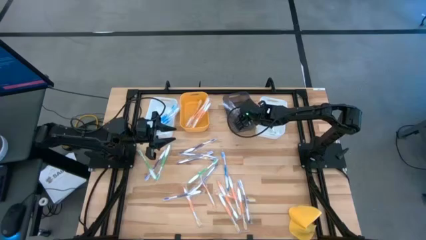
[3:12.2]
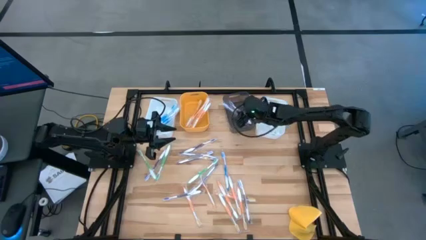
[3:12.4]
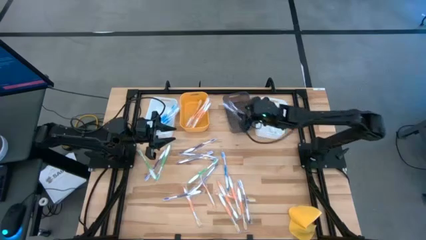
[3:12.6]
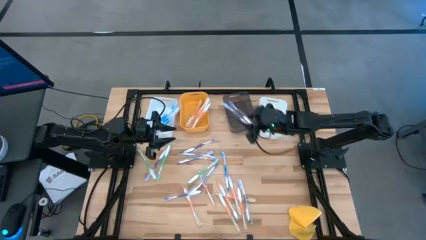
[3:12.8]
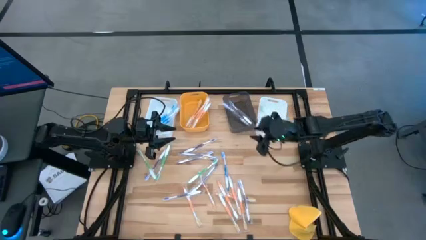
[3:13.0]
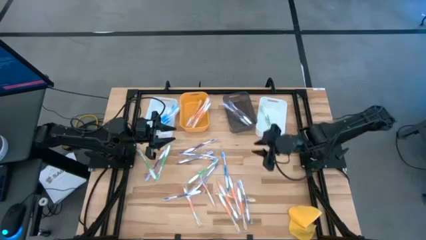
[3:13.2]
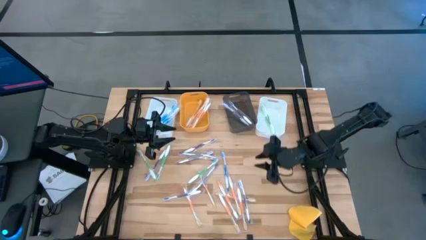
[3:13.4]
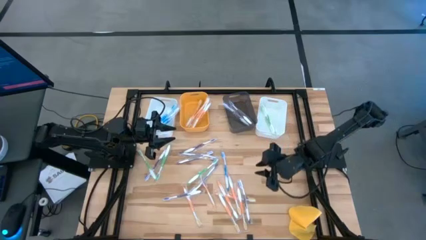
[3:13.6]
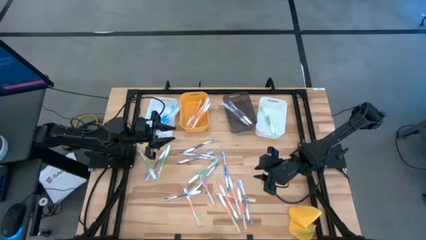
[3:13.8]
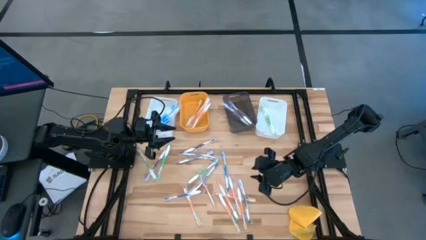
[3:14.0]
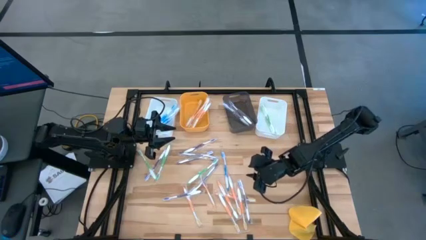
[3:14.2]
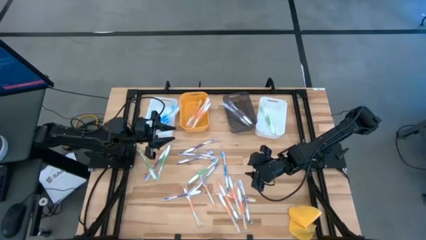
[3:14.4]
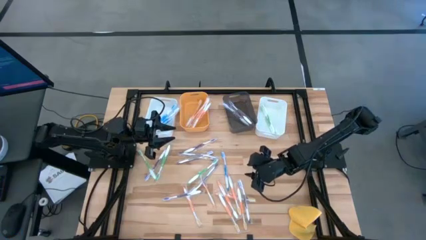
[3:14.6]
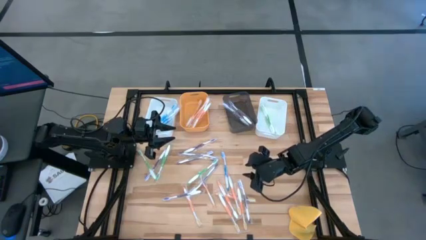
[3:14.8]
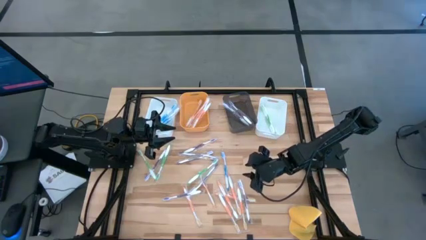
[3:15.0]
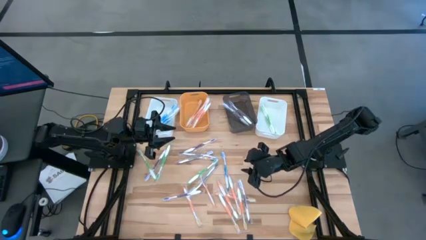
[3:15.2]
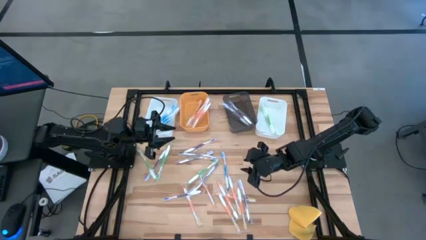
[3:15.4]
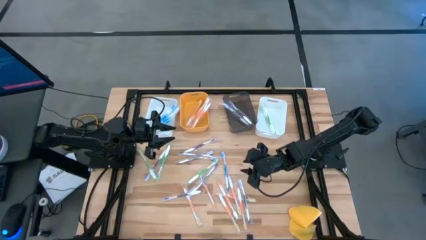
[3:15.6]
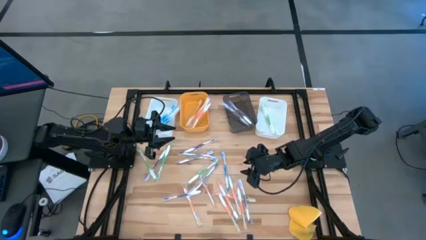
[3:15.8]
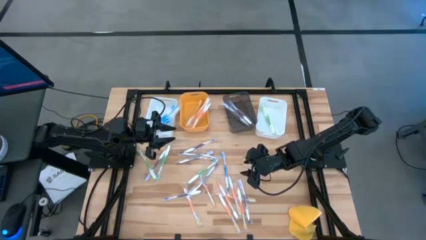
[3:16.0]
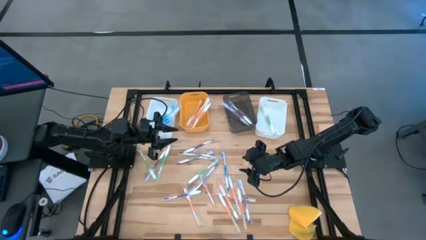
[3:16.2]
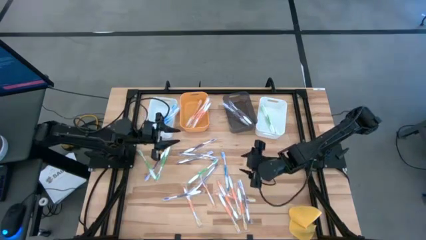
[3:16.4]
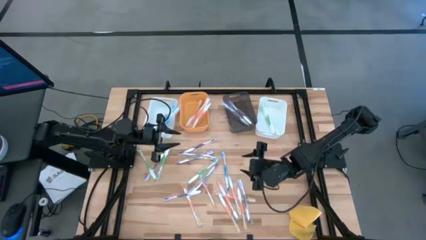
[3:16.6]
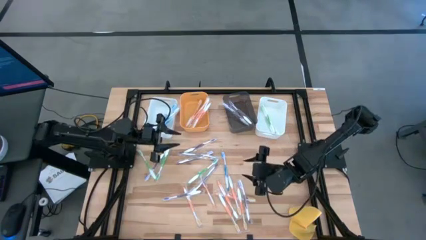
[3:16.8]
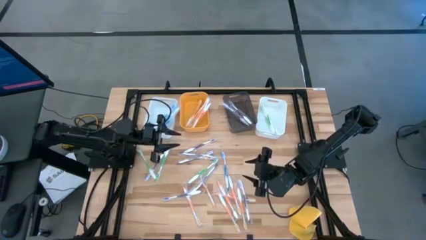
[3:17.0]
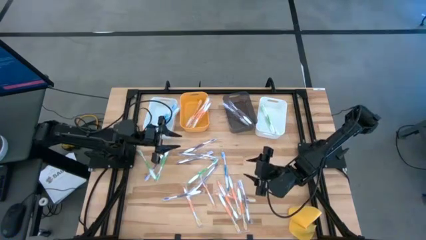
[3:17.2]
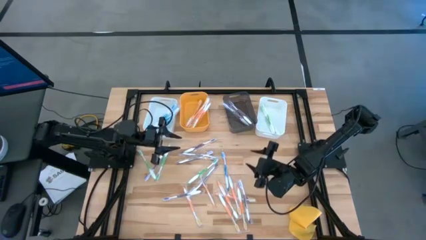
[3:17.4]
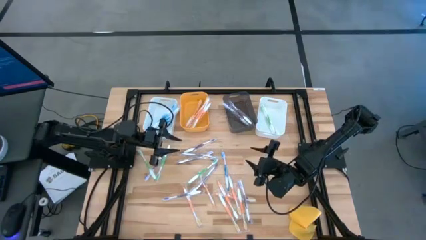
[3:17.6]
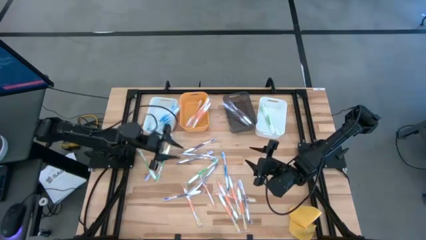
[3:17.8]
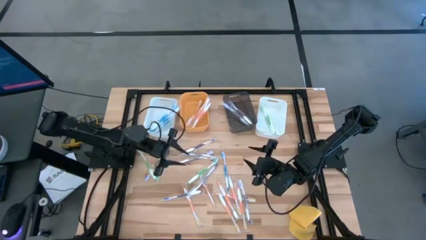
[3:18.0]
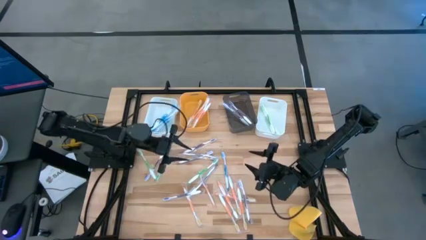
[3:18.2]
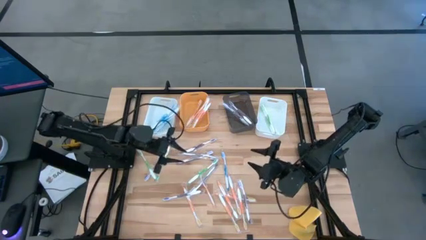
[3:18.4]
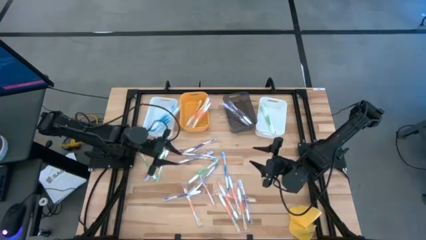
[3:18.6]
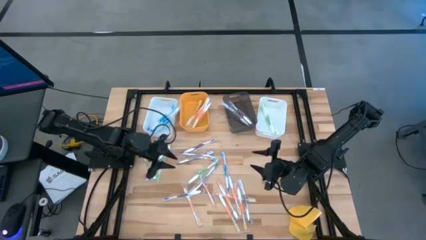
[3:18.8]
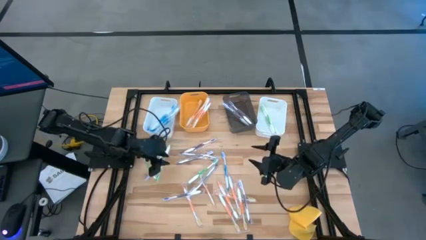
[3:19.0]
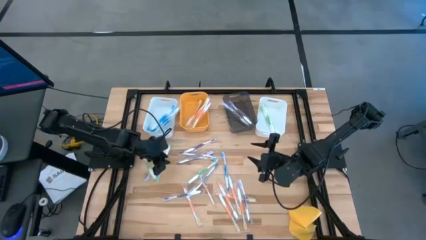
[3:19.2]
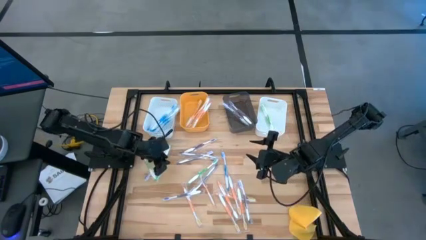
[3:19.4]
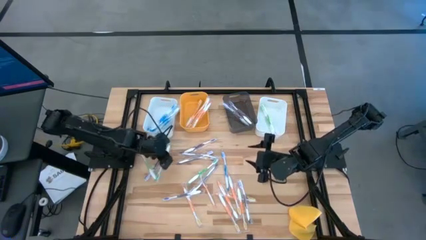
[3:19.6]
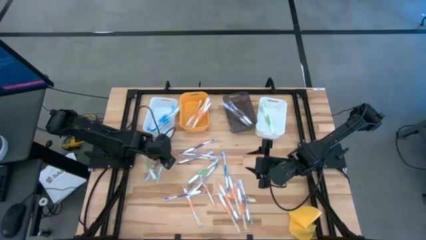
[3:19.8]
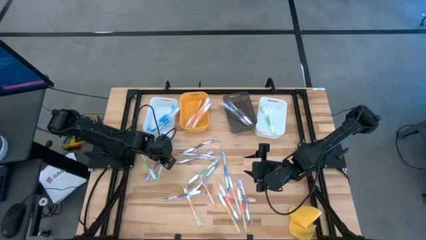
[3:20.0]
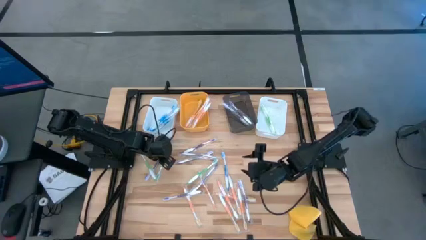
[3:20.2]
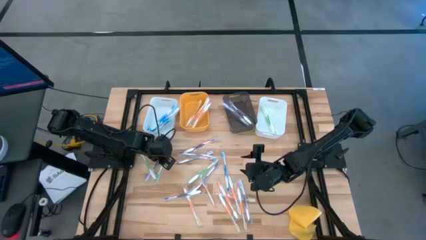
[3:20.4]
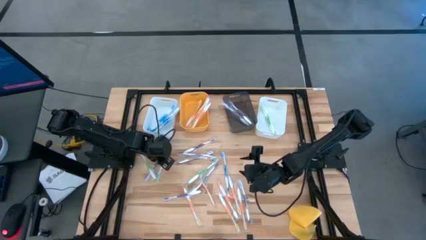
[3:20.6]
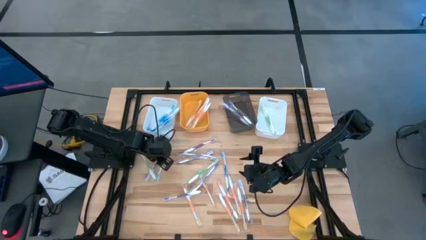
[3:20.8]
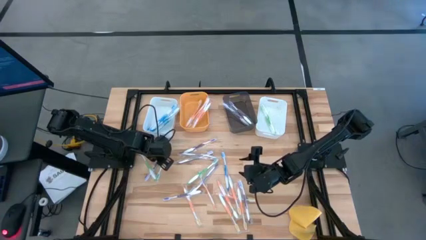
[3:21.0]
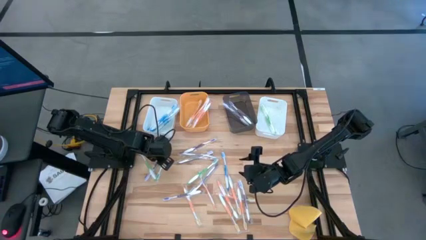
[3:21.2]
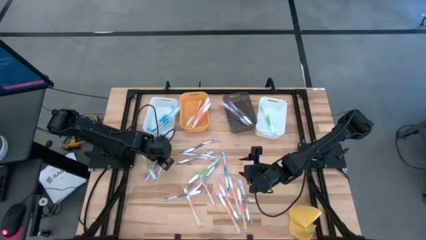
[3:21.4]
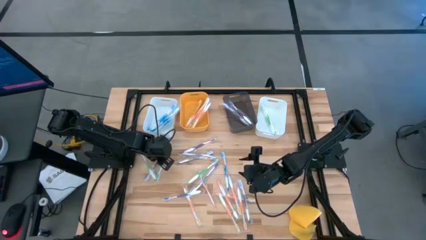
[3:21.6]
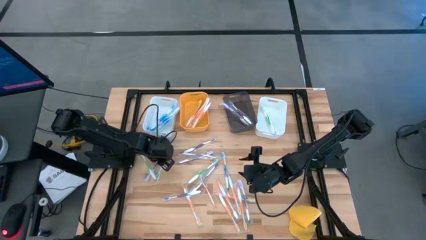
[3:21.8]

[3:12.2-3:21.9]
Task: Pick & Place Toothbrushes
Put the green toothbrush into right white the bin

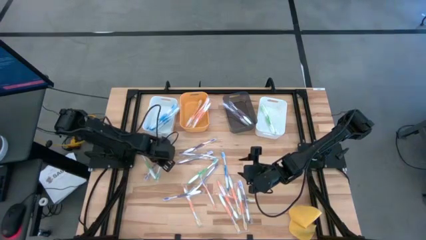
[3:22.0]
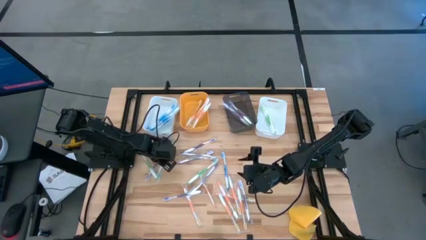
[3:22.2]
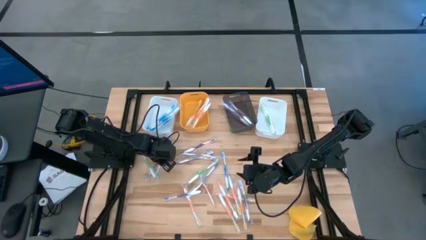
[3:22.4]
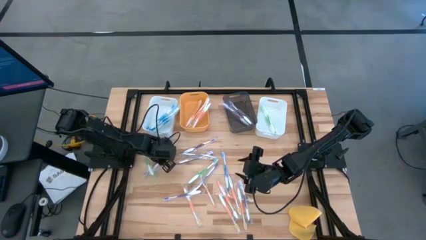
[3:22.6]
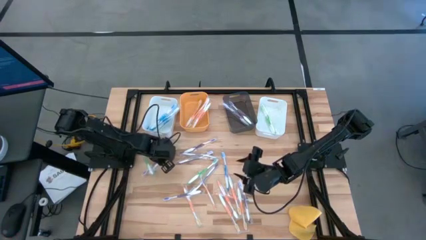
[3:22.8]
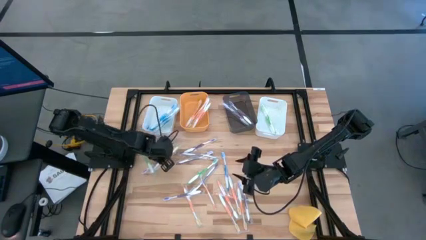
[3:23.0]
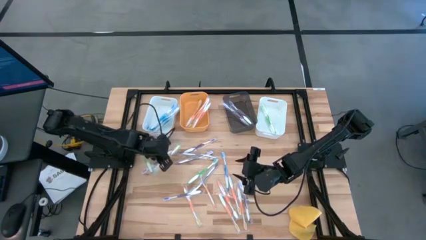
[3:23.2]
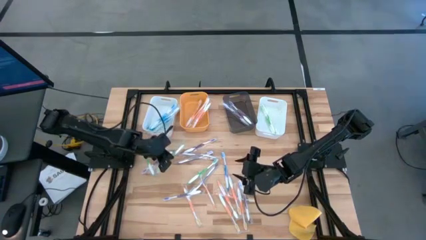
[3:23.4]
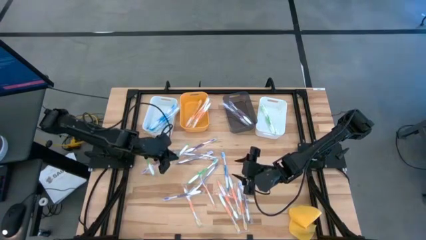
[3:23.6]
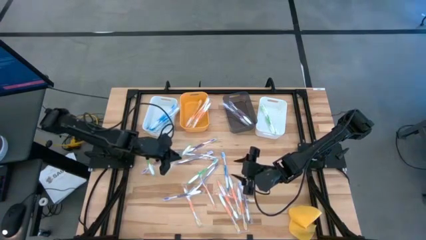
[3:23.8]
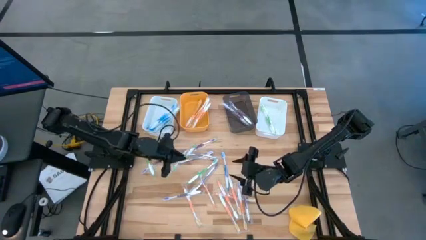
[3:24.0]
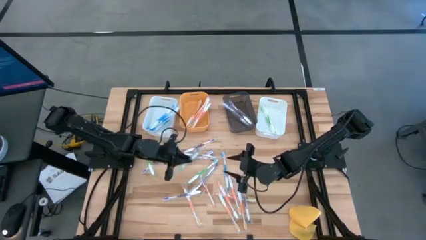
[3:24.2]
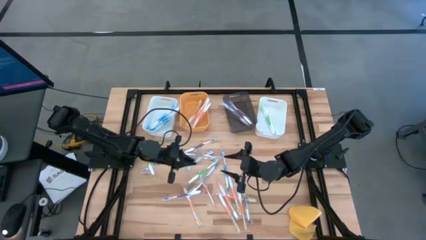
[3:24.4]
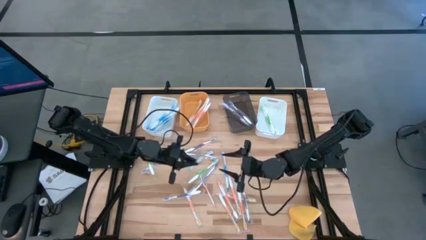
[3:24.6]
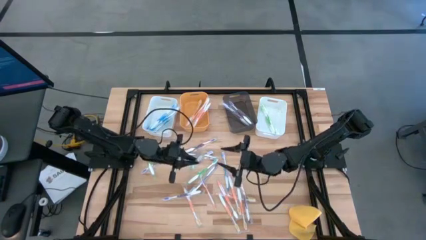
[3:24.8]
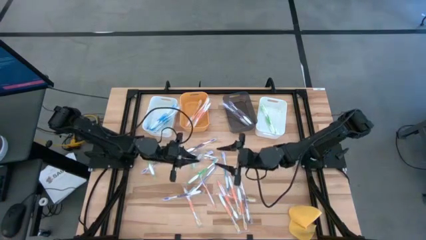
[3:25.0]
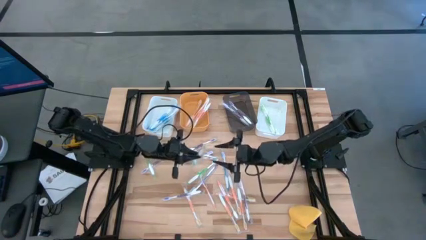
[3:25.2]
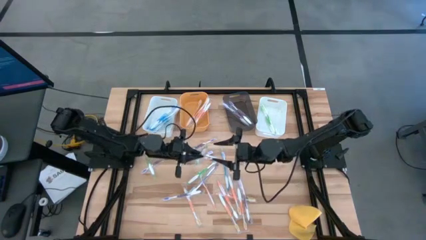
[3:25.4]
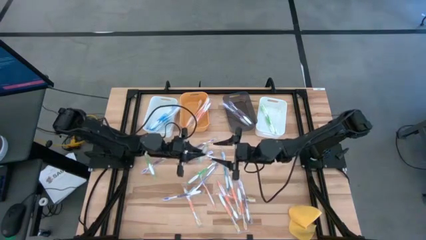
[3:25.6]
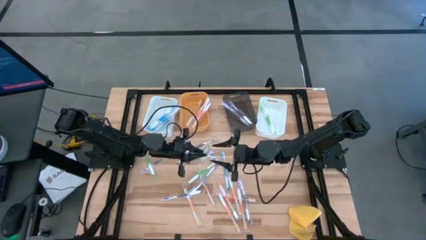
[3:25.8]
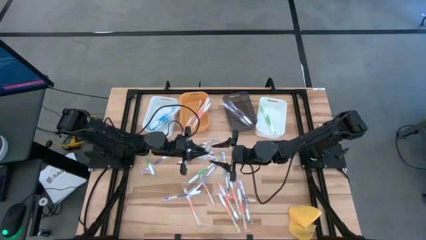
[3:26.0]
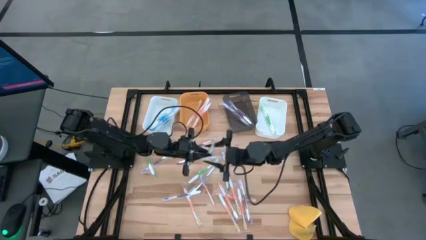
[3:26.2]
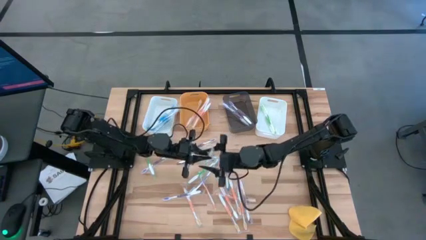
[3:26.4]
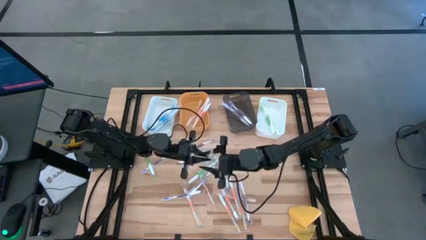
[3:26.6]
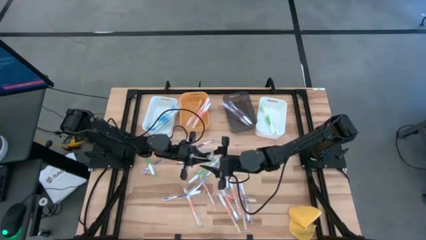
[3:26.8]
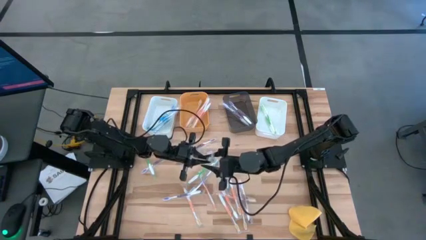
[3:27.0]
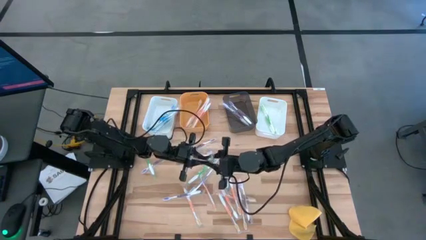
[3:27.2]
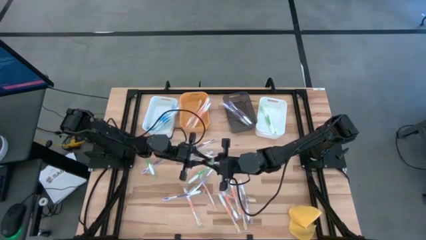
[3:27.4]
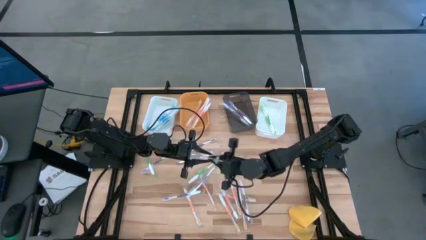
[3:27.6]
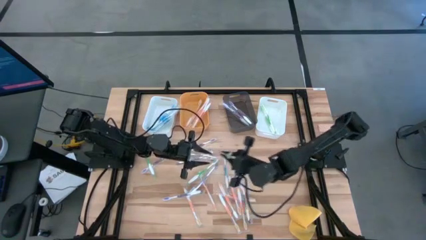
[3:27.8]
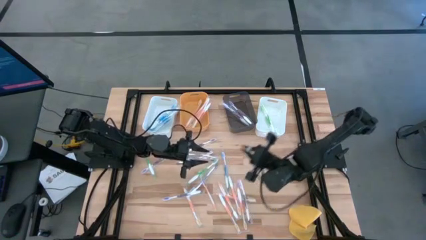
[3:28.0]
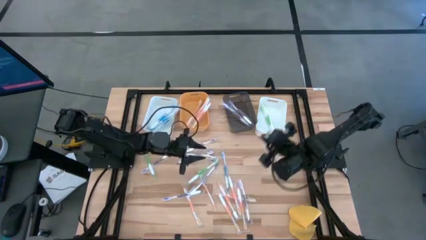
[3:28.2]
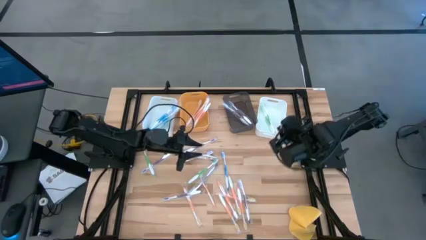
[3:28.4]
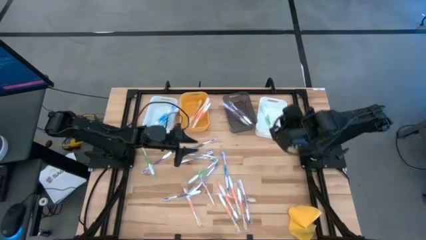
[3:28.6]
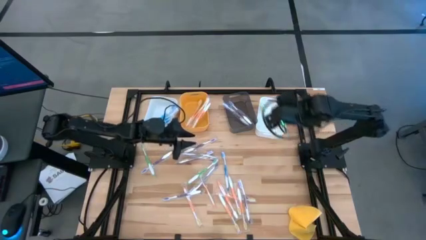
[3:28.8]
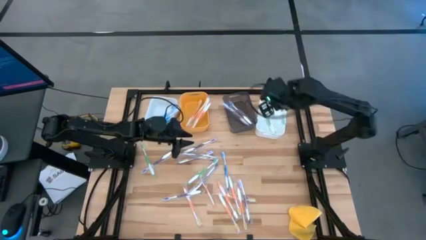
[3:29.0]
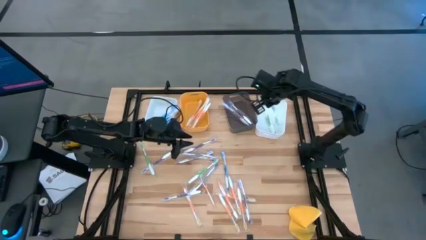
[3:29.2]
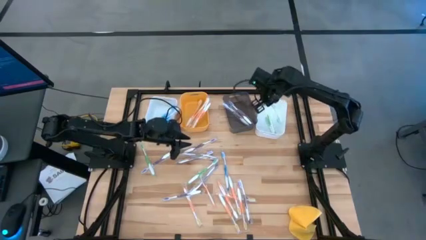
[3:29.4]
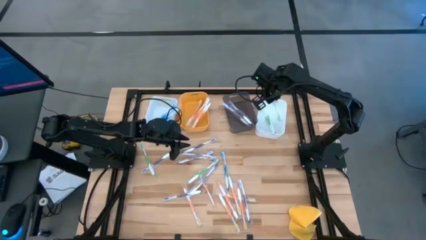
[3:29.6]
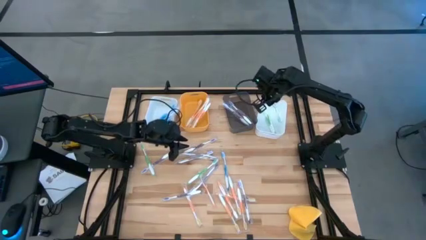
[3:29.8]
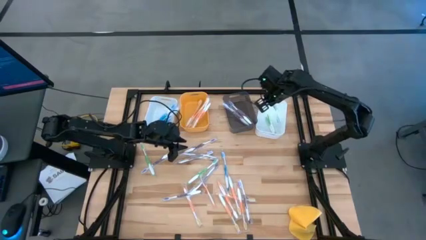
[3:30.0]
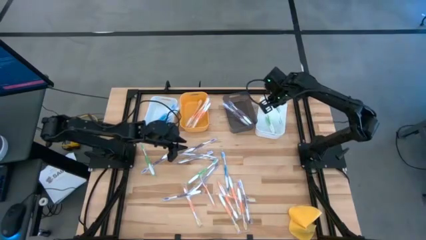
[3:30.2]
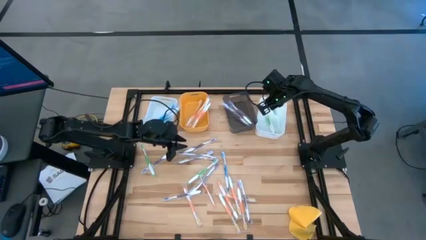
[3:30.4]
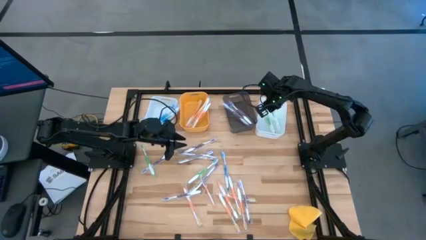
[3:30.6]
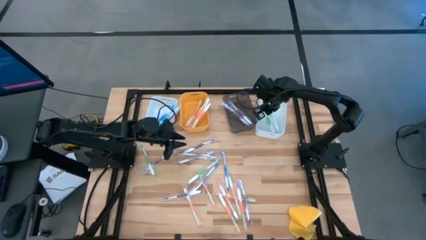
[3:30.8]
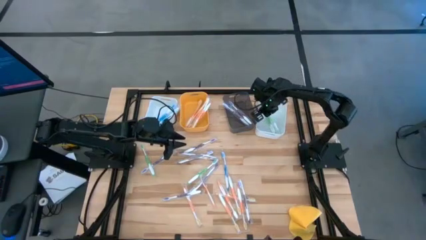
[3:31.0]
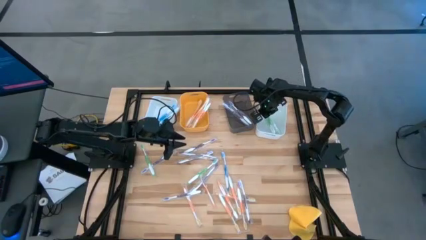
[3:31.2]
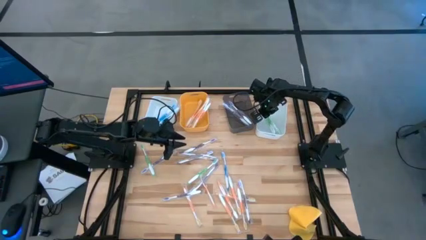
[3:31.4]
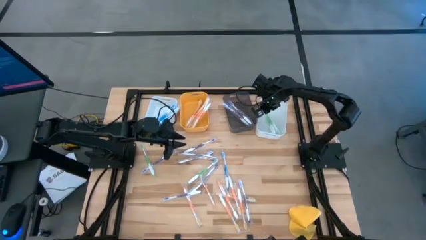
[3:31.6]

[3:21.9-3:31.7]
Put the green toothbrush into right white the bin
